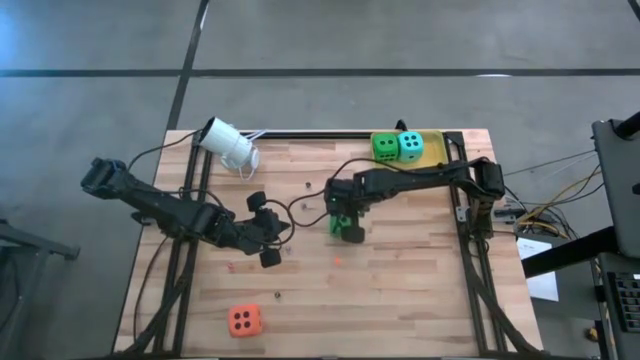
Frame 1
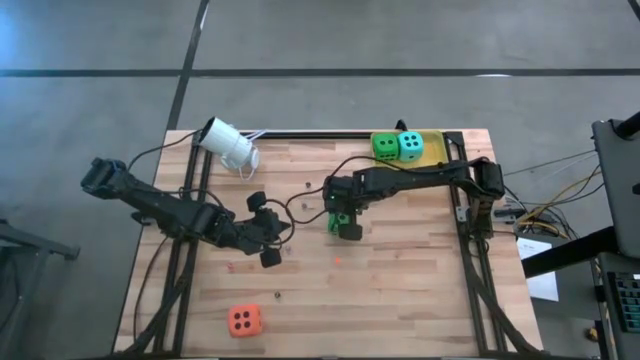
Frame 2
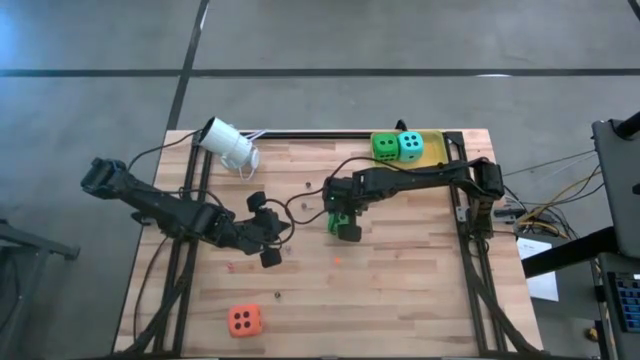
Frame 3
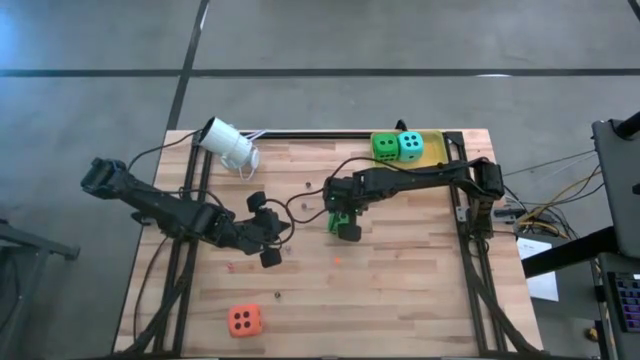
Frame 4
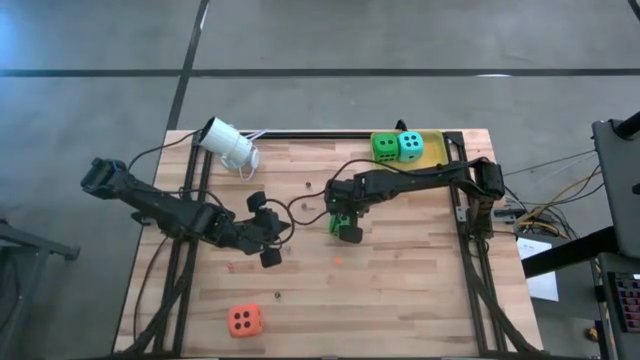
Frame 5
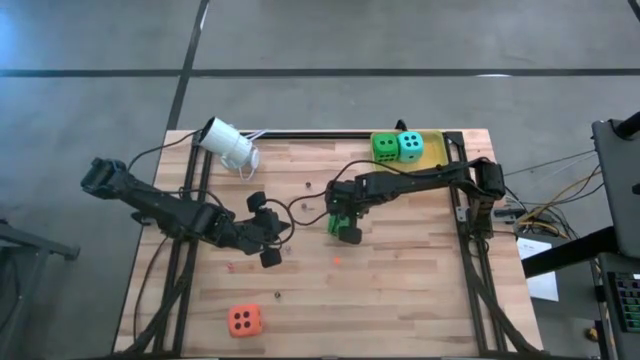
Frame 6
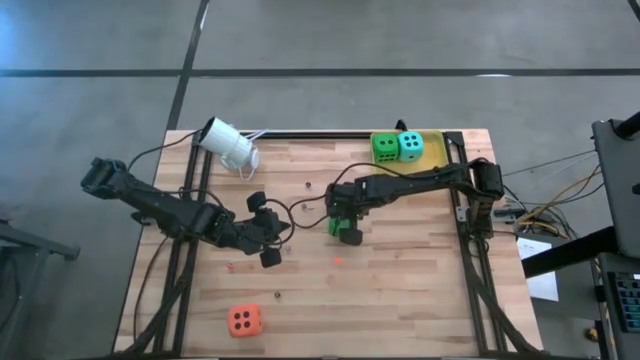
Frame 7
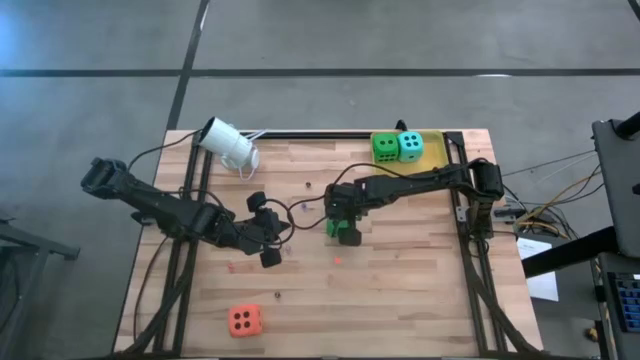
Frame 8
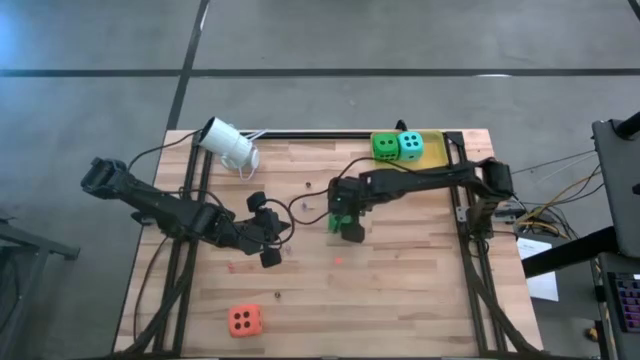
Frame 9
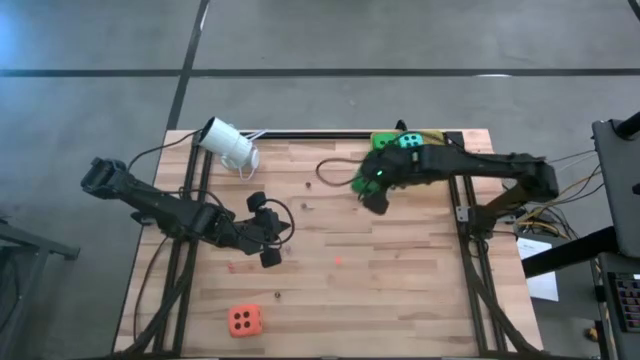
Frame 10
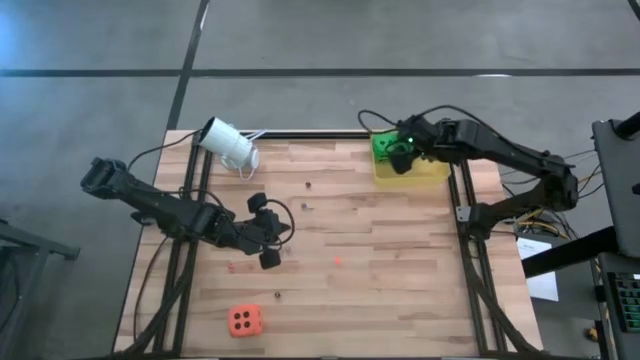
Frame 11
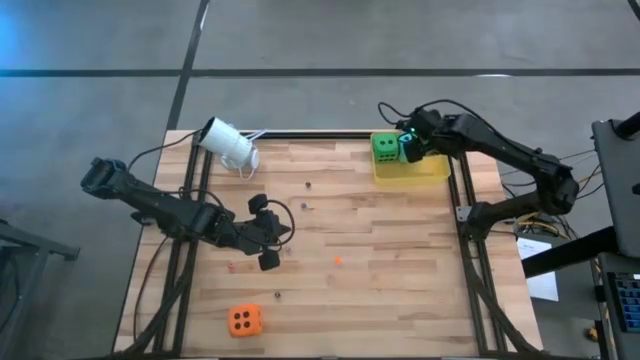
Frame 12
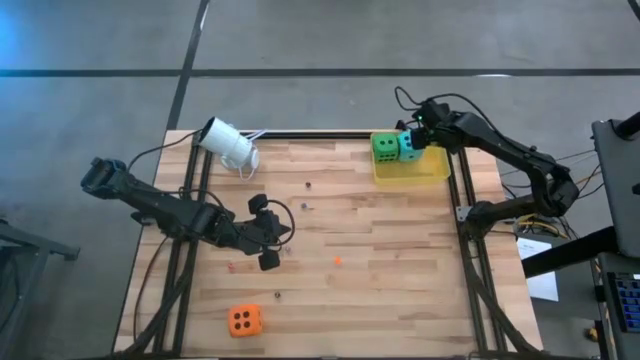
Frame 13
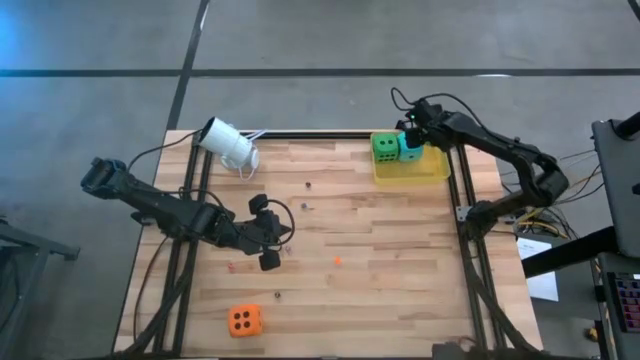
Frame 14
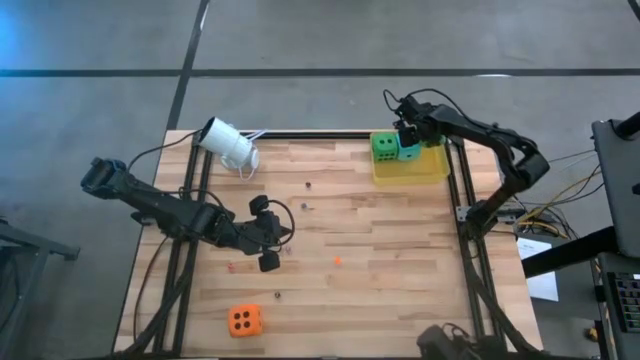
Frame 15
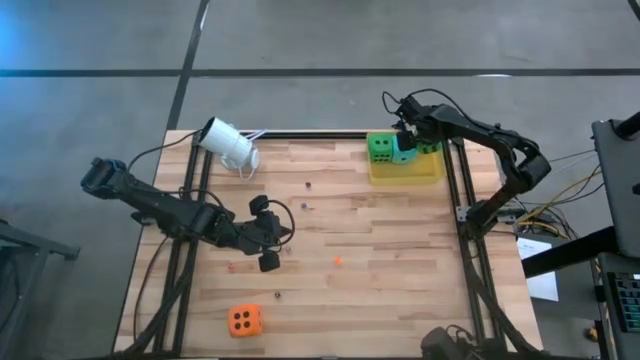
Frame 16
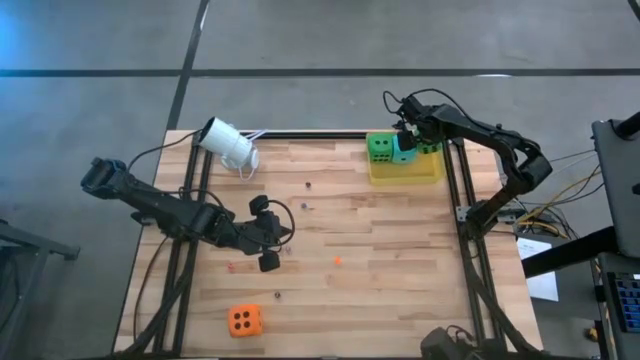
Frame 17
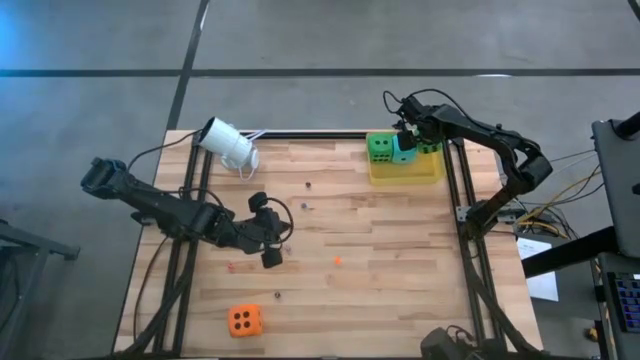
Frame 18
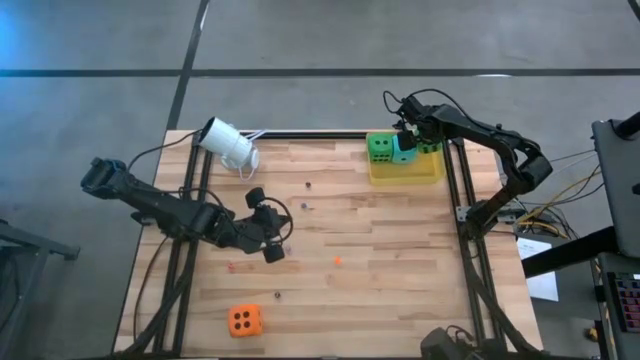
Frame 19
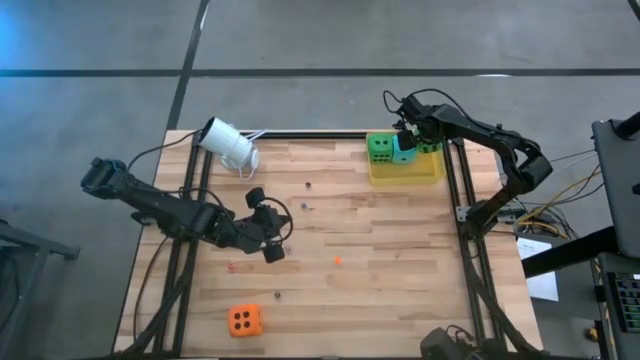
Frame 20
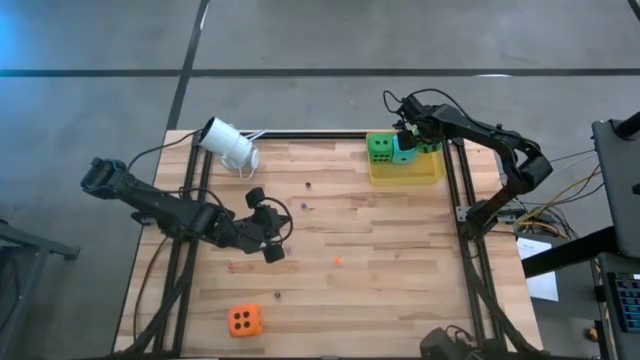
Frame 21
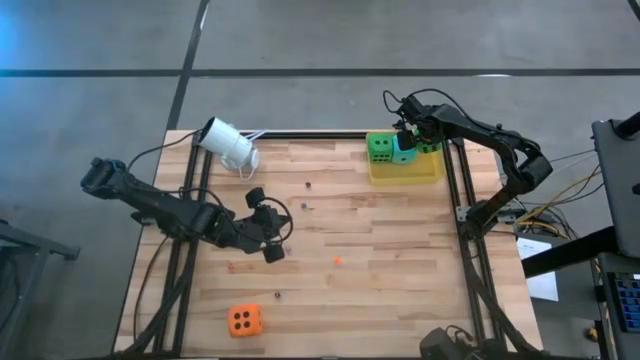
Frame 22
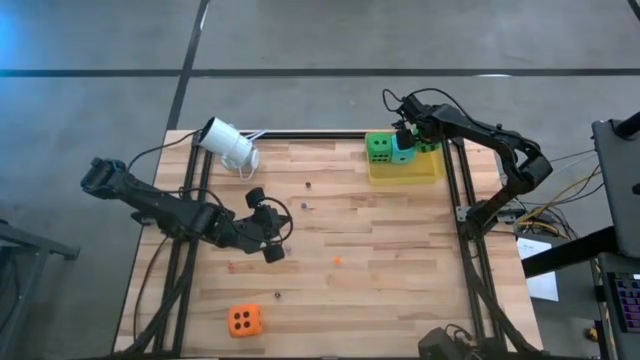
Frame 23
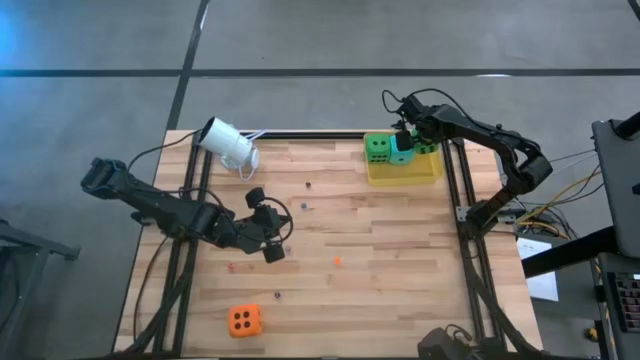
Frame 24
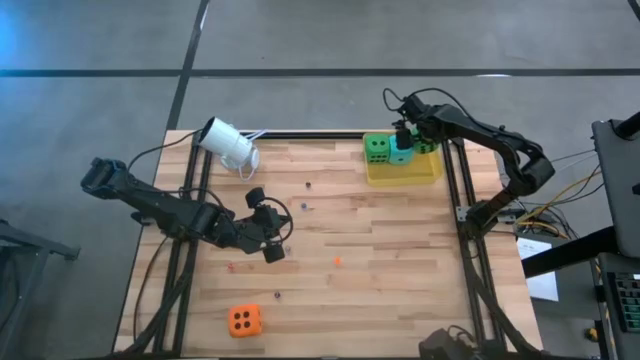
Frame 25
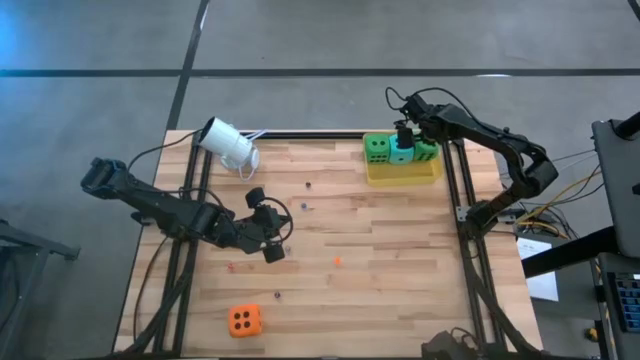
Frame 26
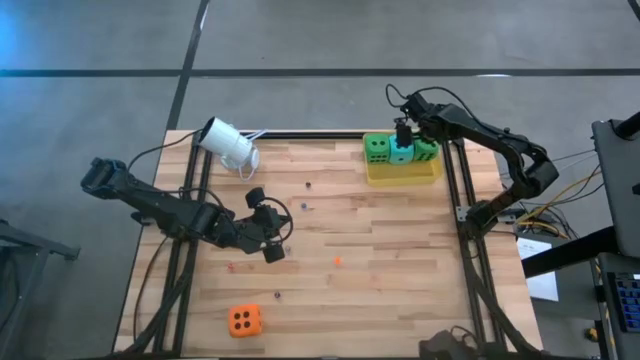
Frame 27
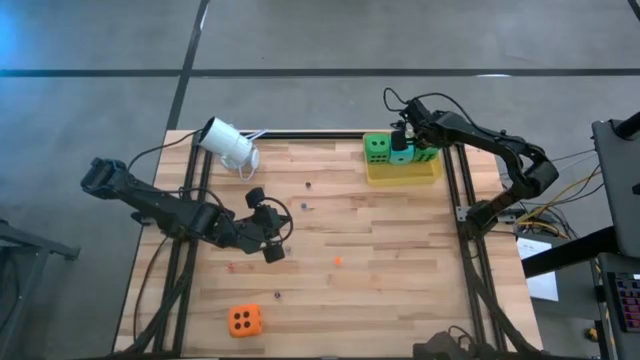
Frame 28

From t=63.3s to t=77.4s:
Task: Pick & Place Dice
Put the large green dice into the yellow transparent bin

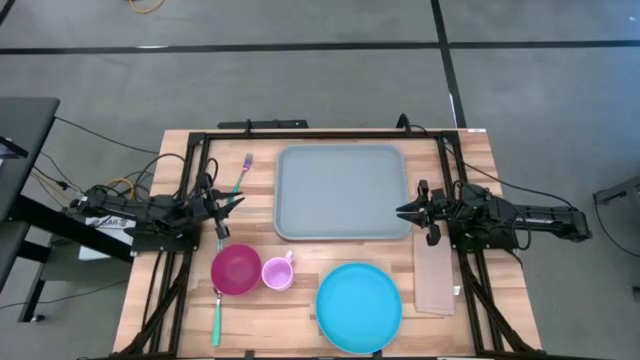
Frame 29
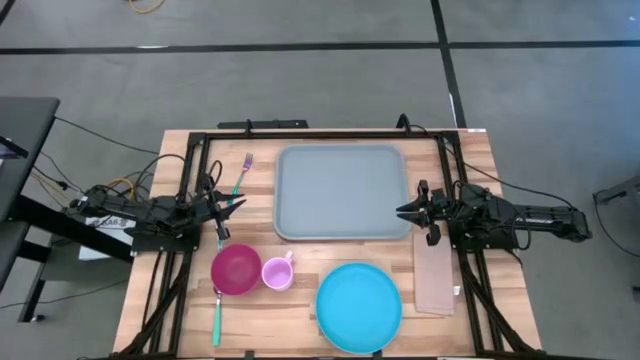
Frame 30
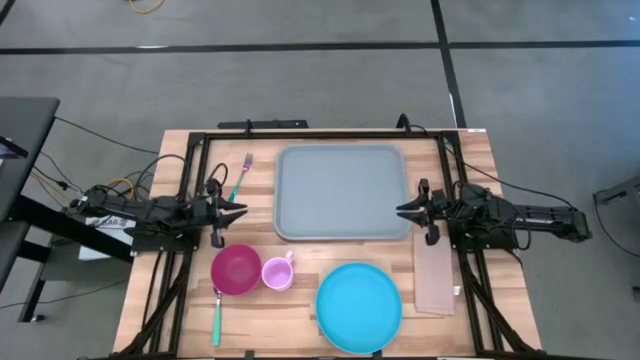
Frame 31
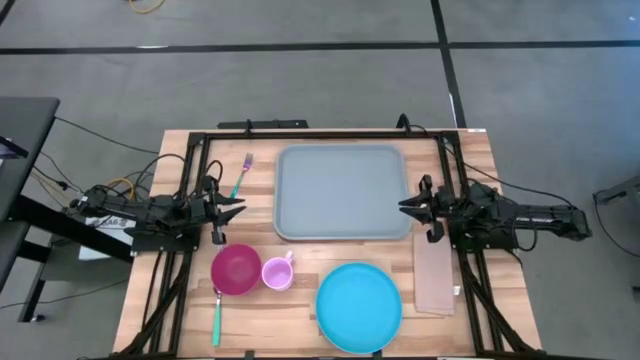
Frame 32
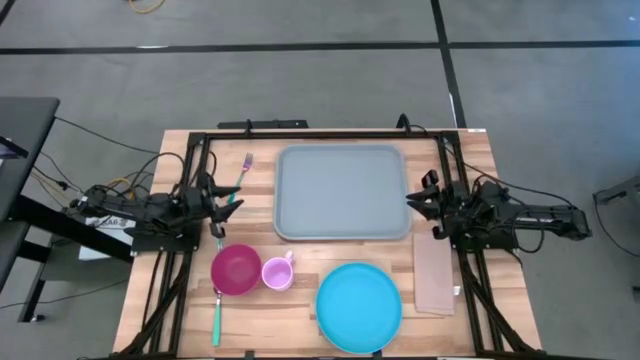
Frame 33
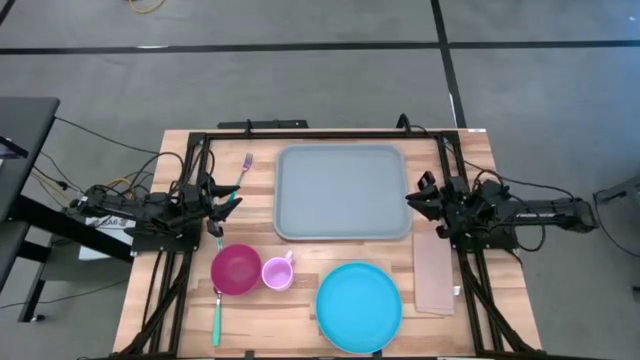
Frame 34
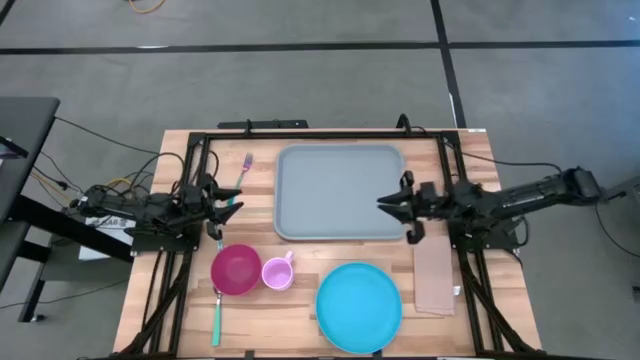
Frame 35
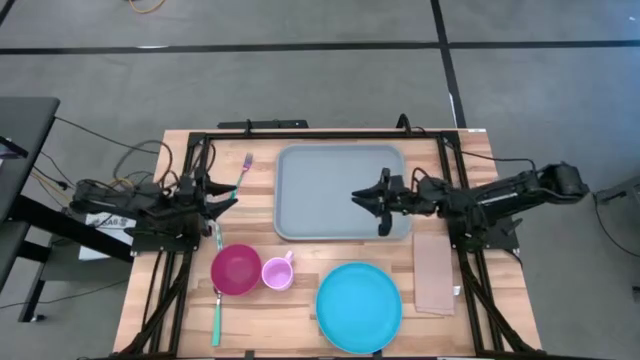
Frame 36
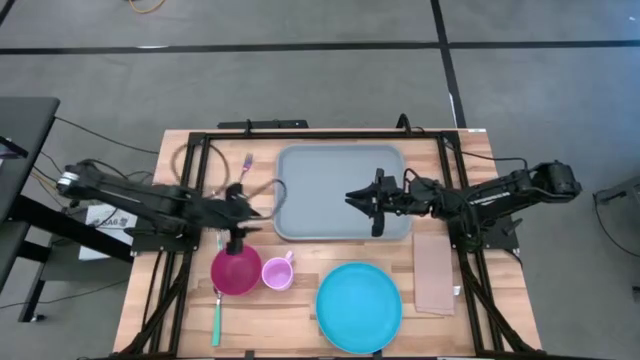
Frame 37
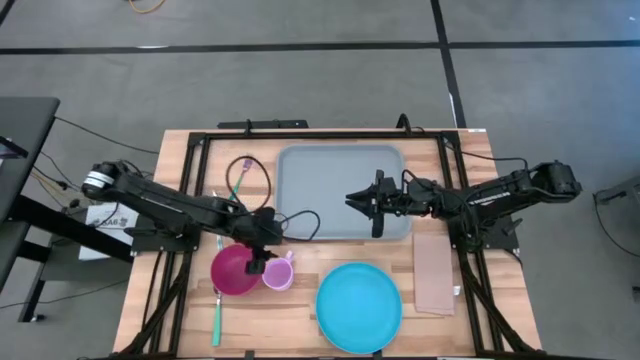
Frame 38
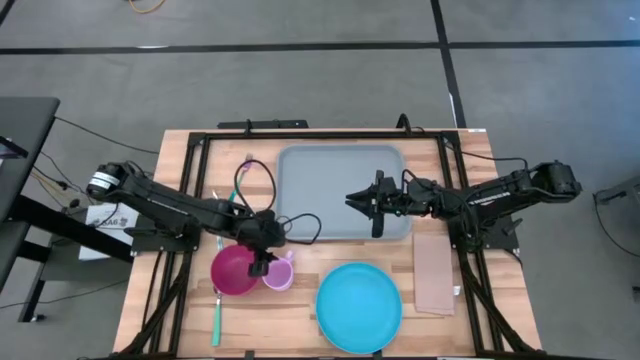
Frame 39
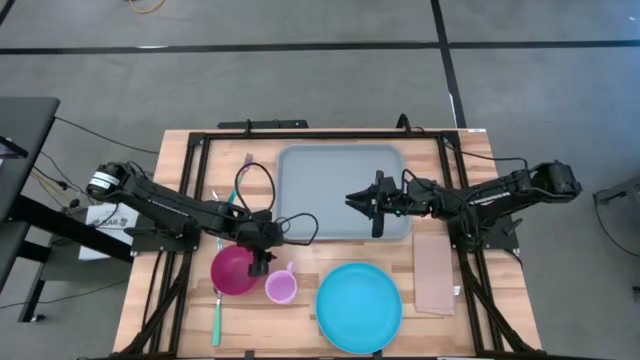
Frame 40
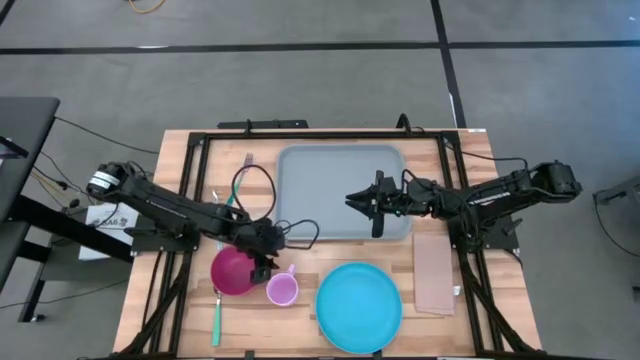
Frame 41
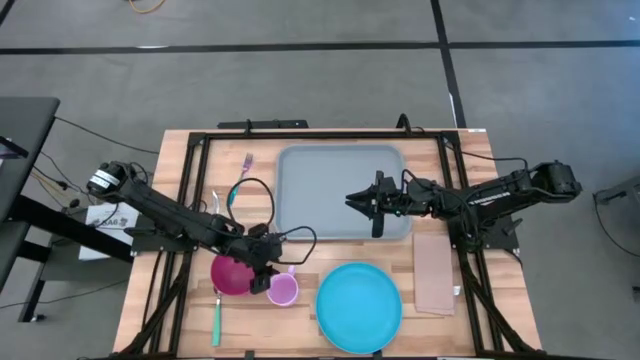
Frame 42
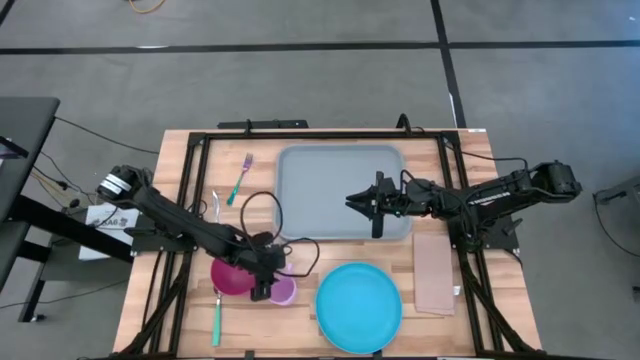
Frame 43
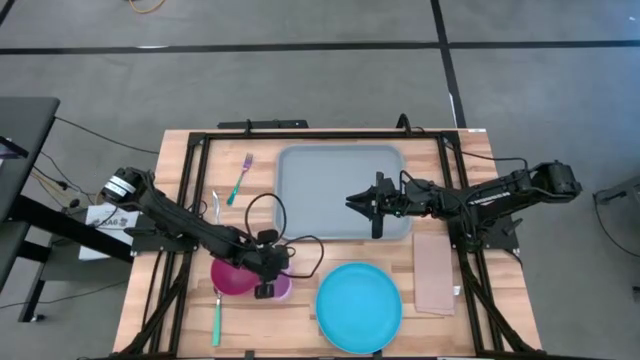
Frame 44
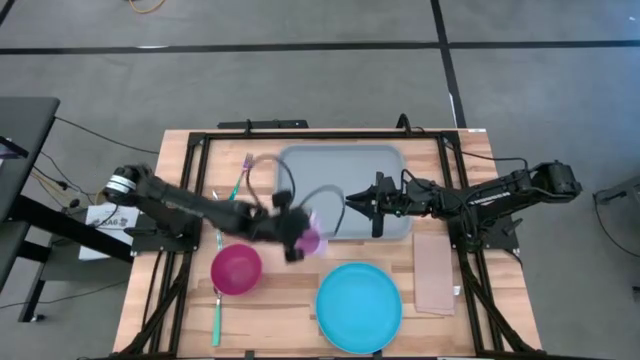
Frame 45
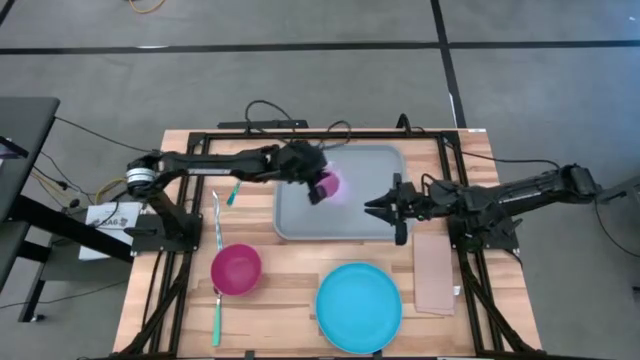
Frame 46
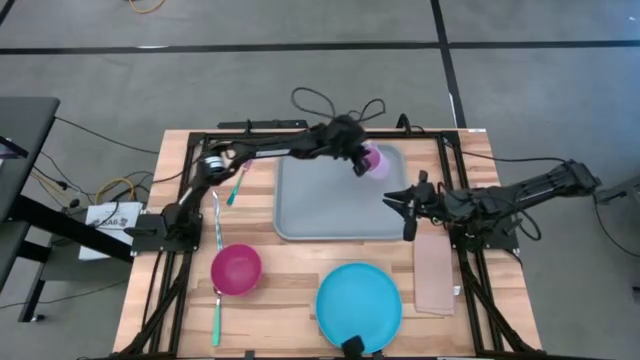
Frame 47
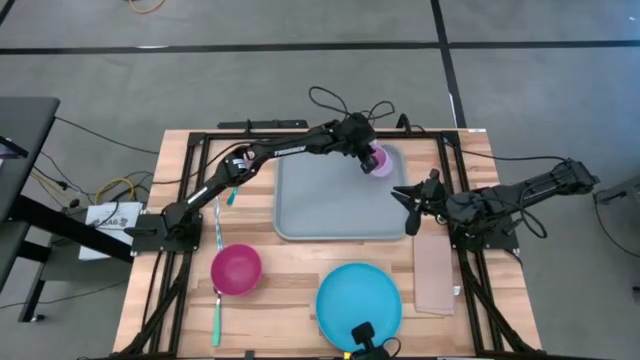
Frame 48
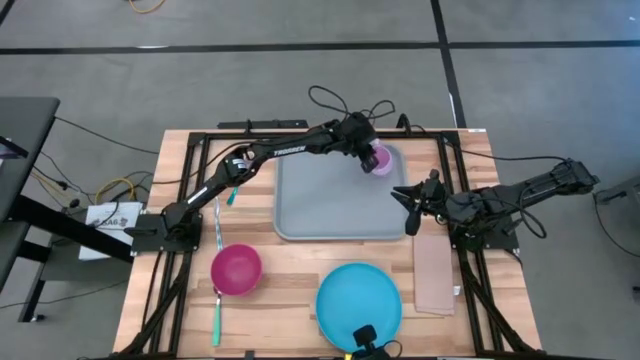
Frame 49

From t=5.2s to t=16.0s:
Task: Set up tray
Put the pink mug on the gray tray
